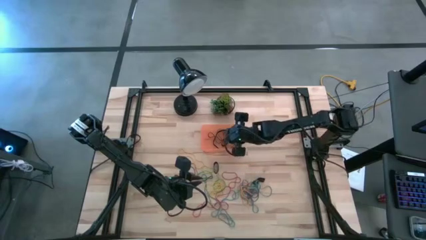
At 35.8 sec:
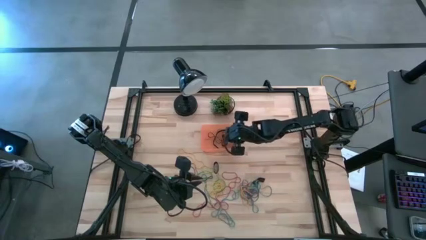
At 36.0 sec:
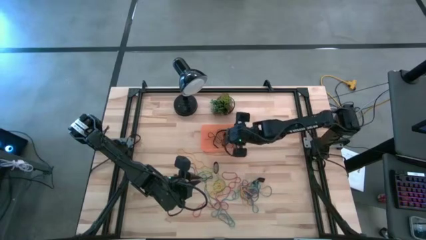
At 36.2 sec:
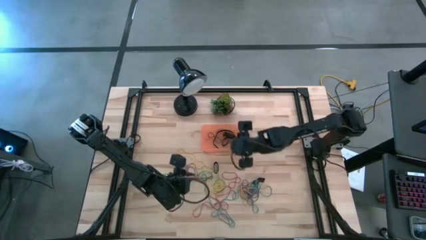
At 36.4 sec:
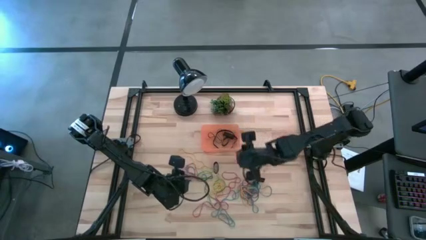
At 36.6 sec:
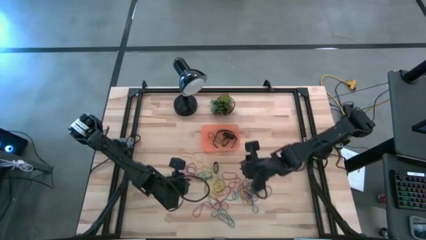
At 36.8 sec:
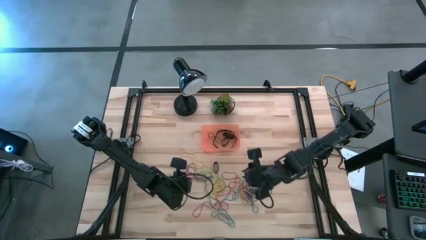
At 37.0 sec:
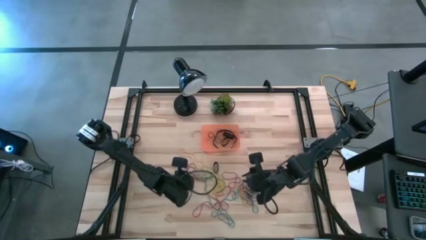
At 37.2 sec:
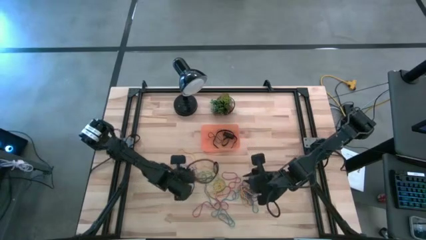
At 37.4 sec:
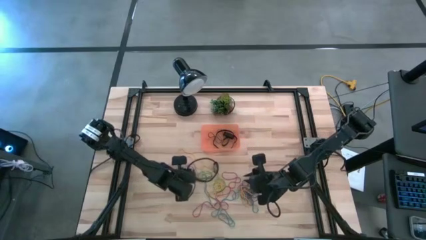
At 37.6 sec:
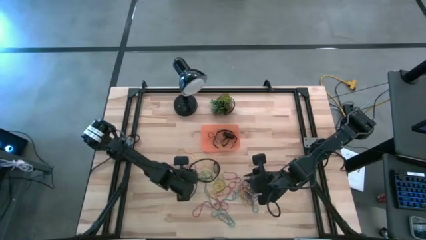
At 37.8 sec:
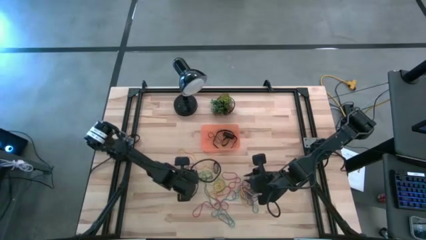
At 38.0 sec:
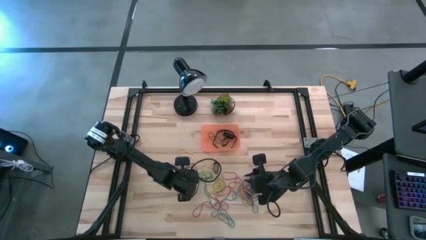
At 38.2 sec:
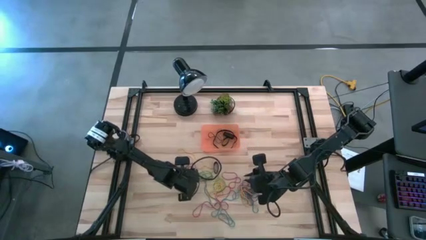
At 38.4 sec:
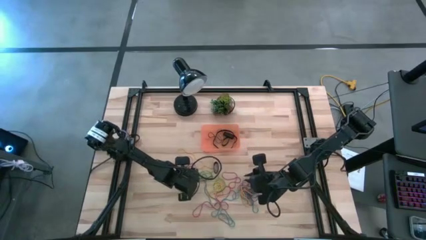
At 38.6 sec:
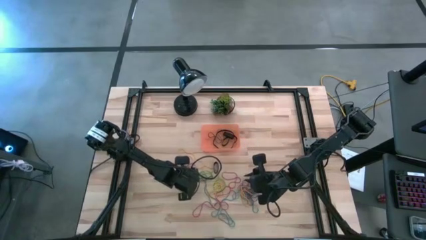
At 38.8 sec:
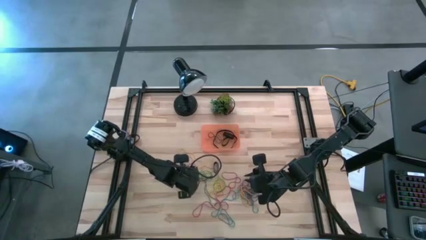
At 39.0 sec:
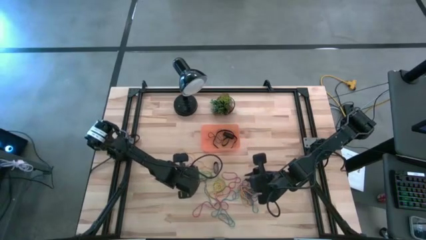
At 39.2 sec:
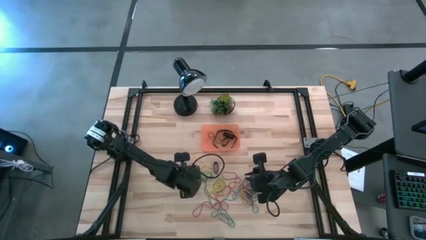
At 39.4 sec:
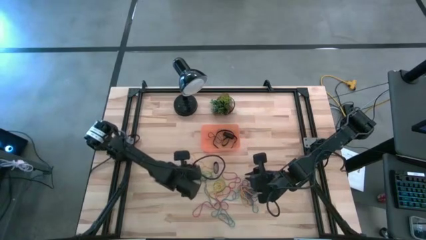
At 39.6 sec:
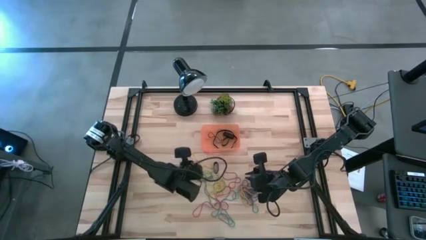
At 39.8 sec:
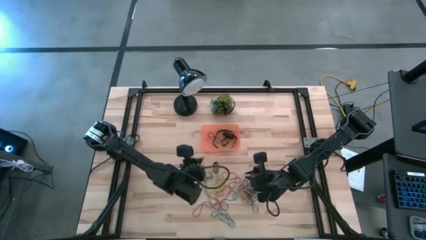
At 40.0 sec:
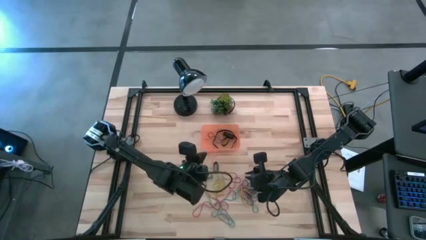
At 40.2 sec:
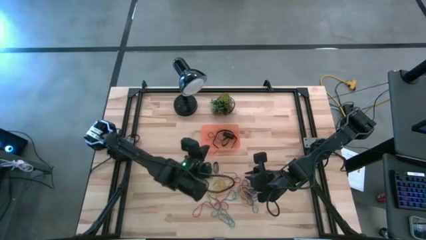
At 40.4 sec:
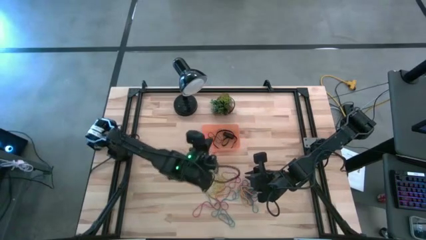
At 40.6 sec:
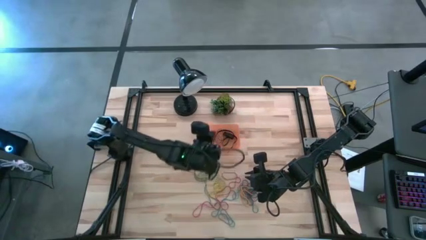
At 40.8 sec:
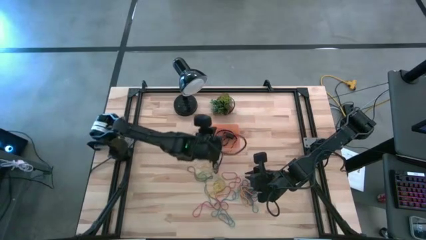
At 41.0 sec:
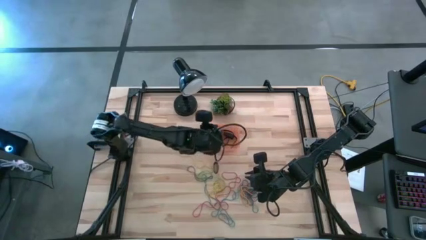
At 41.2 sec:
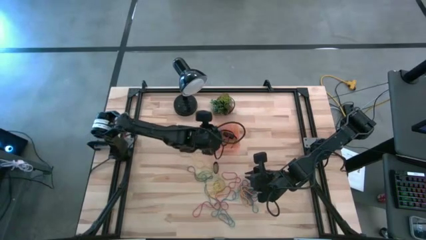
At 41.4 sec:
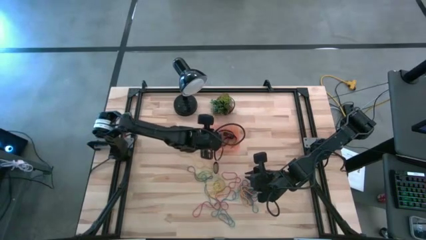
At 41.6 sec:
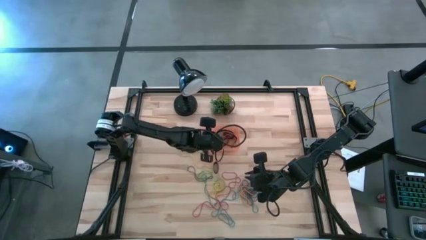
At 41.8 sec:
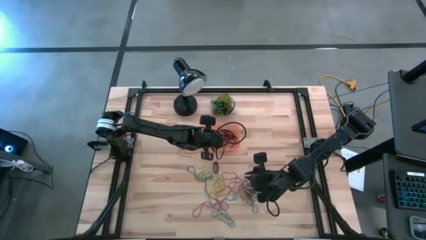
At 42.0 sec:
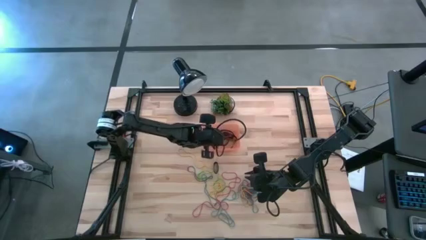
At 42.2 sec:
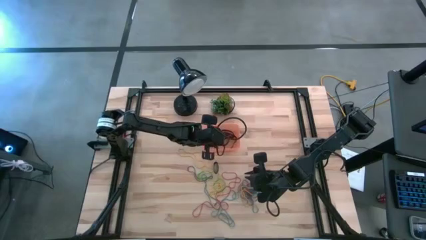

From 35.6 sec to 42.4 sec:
Task: Pick and place rubber bands into bin
Put the red rubber band into the orange bin

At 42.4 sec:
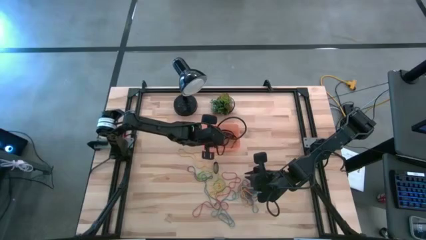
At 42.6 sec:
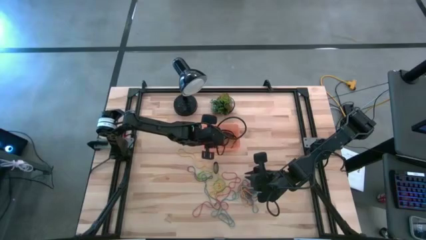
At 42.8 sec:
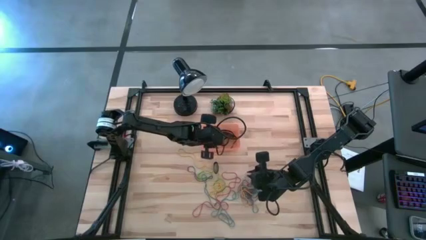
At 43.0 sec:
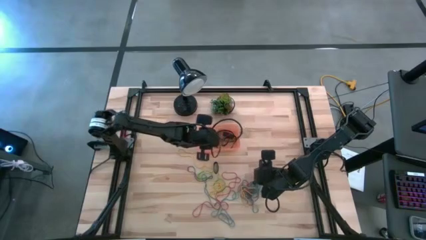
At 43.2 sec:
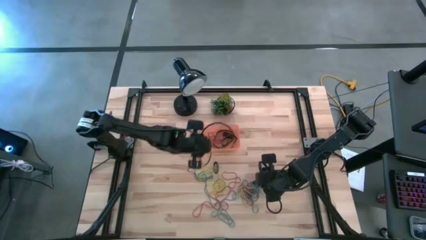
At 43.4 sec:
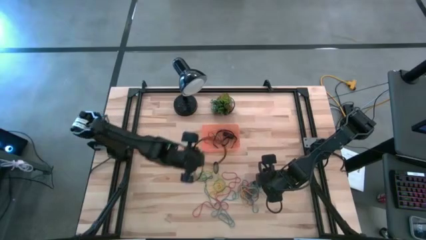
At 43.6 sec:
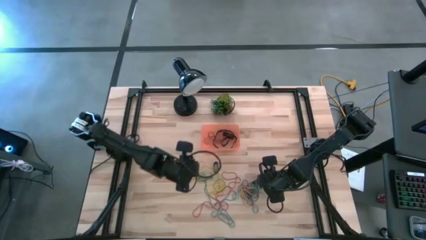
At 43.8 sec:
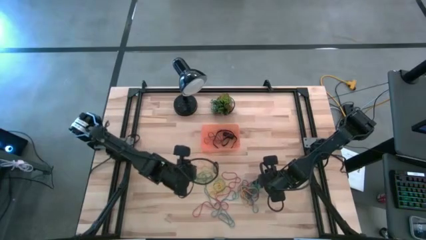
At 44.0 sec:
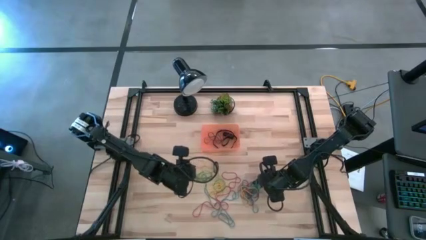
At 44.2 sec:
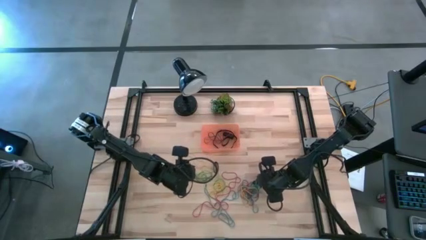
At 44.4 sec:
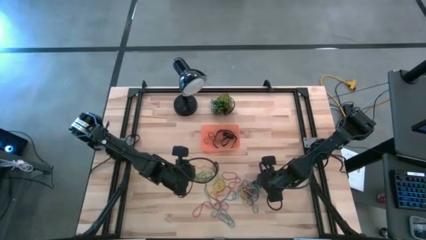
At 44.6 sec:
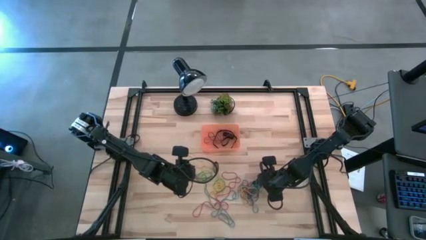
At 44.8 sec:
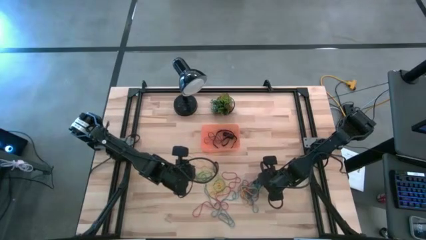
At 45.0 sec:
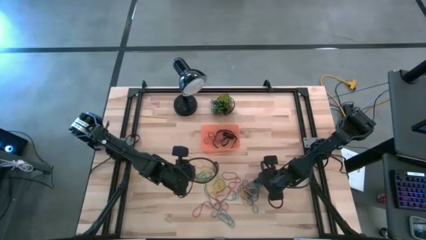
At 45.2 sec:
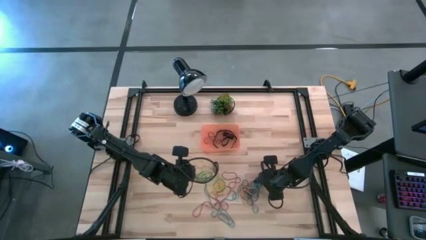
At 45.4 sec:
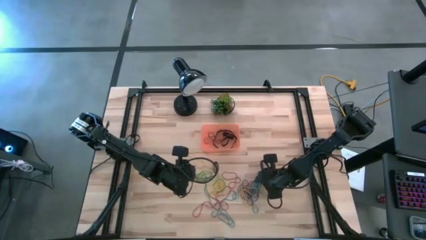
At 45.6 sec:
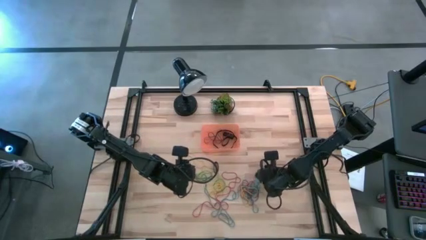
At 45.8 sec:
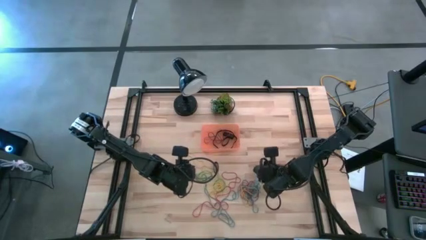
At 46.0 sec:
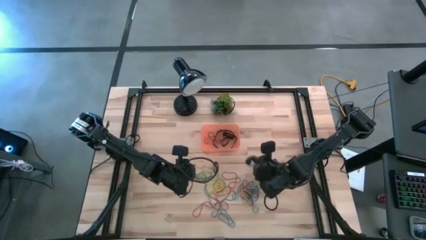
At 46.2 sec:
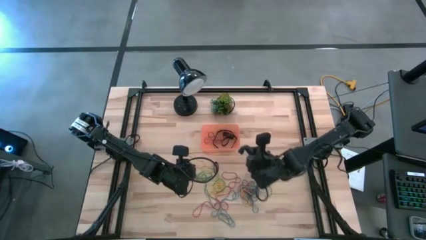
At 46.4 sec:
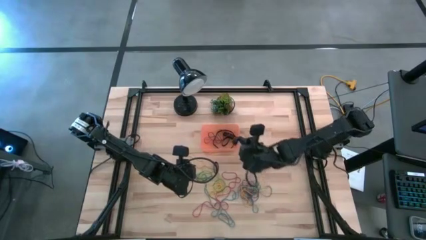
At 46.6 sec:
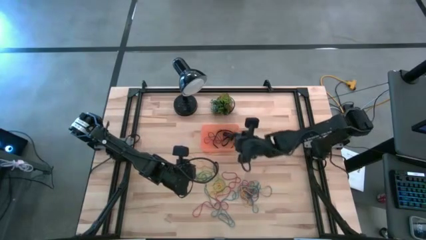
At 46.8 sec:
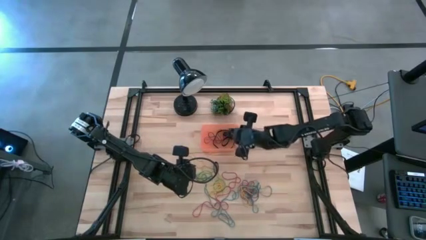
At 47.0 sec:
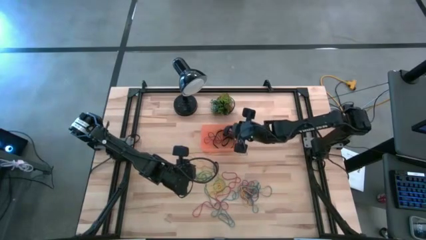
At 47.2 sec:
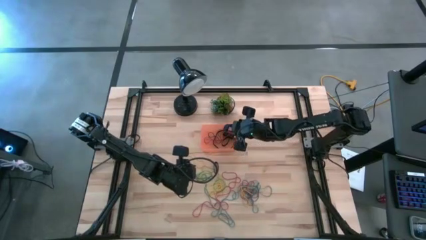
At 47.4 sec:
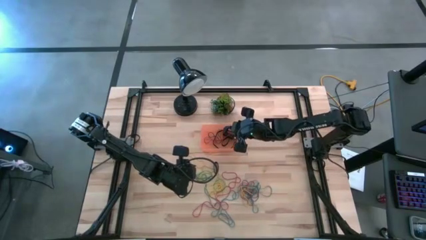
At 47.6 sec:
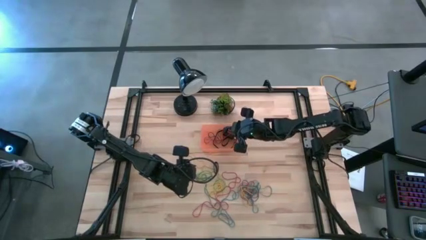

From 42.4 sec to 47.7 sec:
Put the black rubber band into the orange bin

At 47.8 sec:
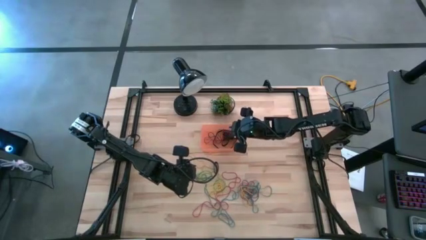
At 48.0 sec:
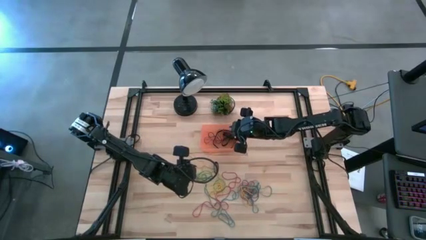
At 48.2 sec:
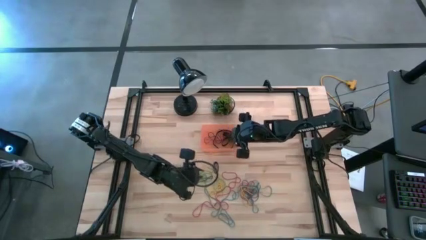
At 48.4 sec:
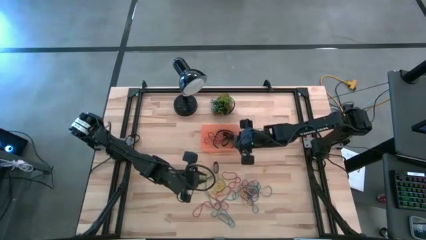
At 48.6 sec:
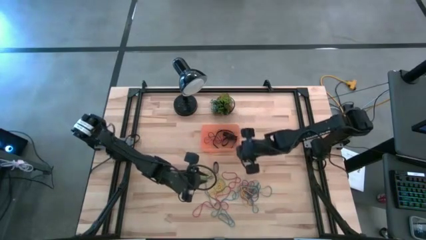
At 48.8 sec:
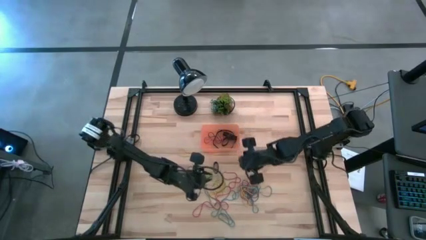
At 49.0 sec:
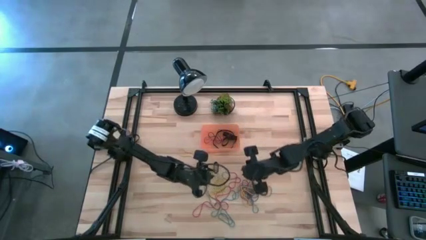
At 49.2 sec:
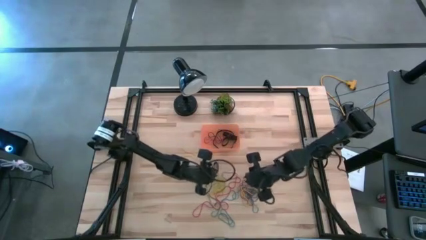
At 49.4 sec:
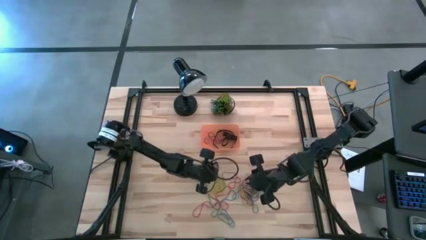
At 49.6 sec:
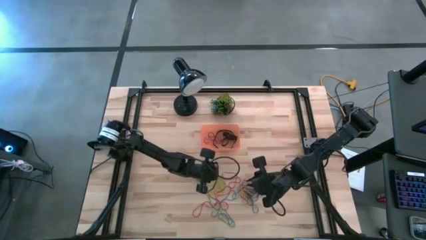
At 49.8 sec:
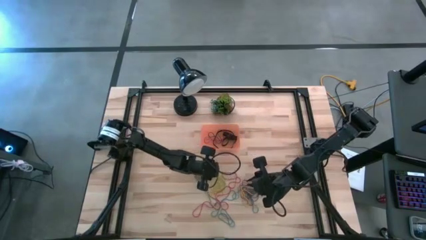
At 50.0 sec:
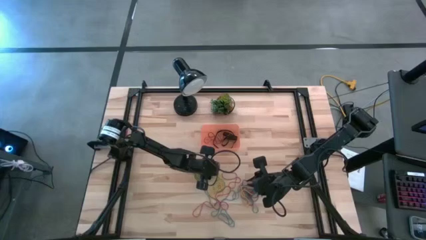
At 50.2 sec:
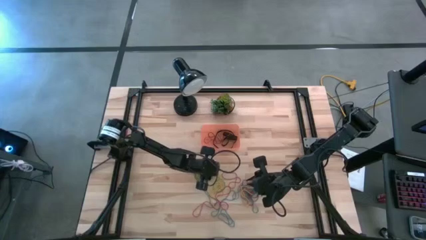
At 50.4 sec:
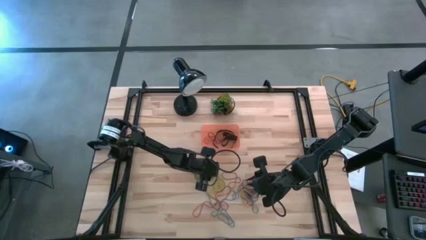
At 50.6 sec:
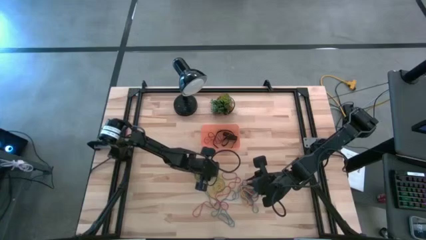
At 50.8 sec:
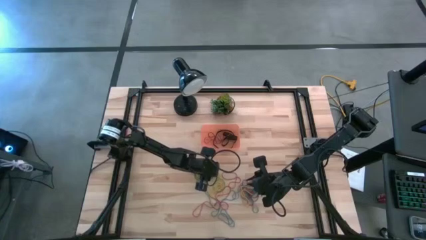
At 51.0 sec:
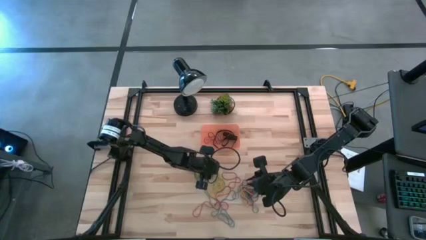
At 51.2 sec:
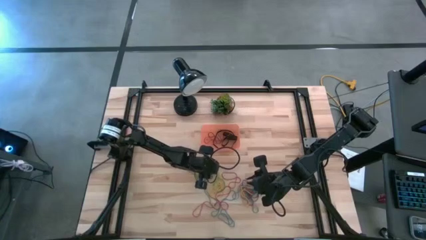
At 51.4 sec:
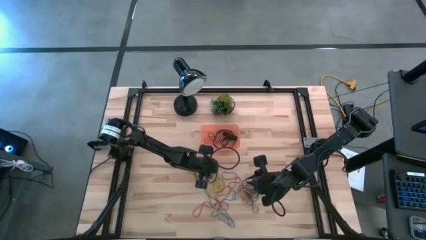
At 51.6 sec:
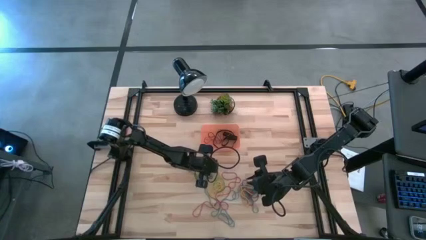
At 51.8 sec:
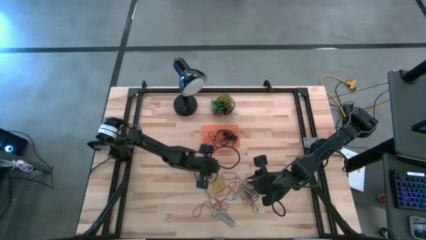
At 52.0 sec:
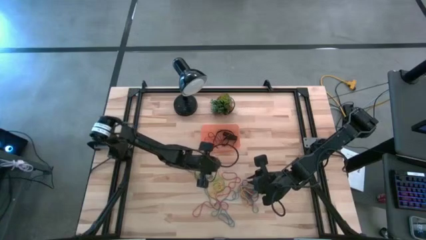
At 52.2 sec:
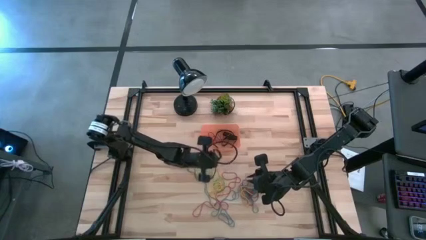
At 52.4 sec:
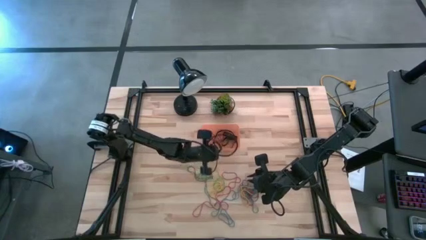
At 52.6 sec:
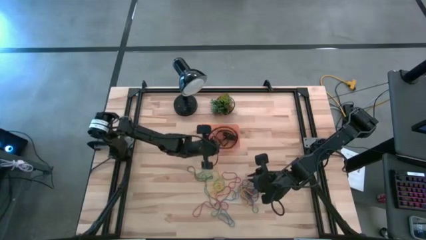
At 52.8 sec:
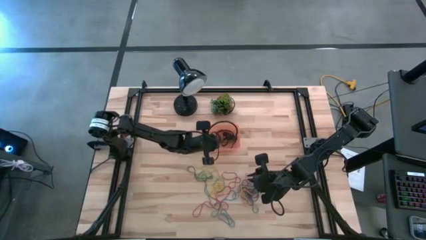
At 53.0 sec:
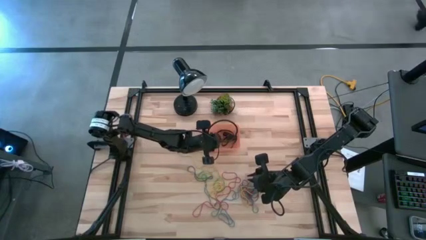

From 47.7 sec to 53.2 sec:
Put the black rubber band into the orange bin
